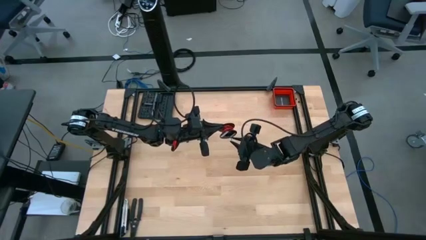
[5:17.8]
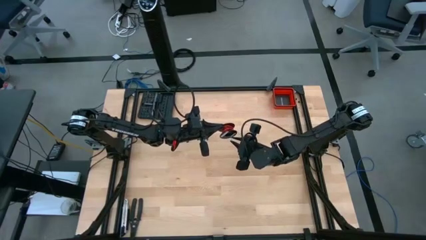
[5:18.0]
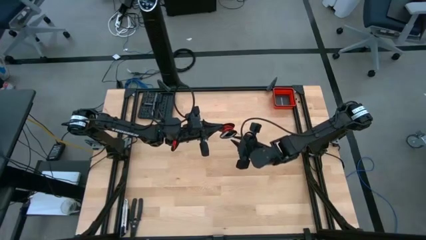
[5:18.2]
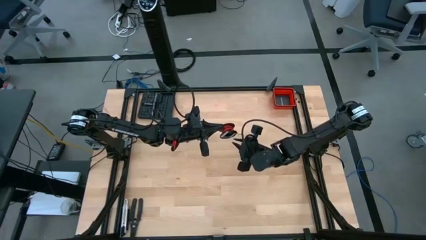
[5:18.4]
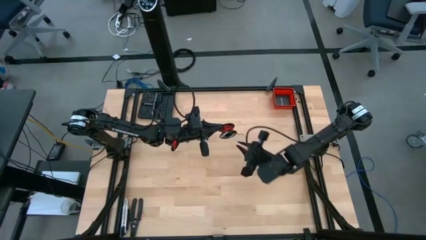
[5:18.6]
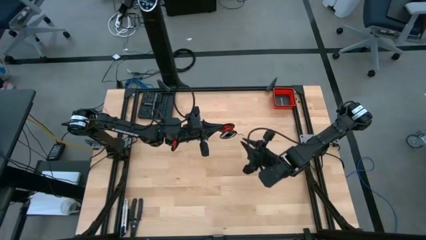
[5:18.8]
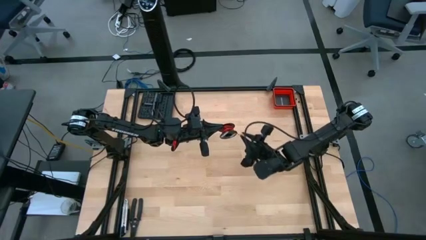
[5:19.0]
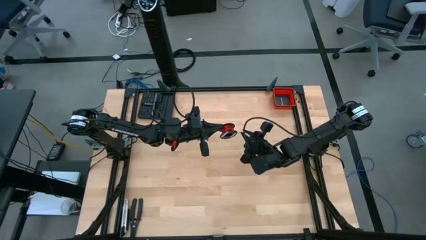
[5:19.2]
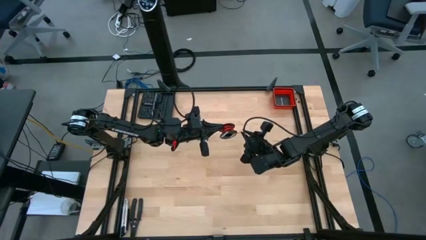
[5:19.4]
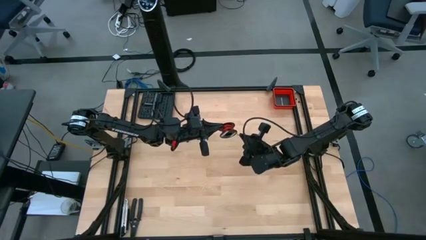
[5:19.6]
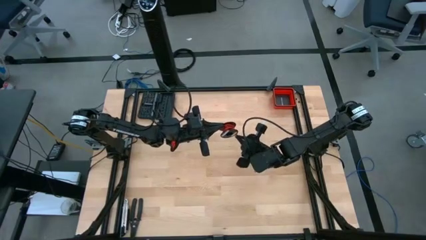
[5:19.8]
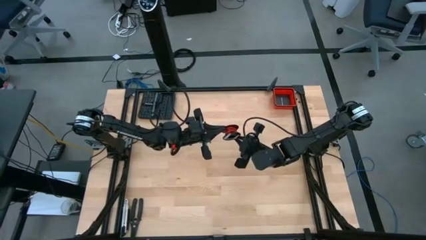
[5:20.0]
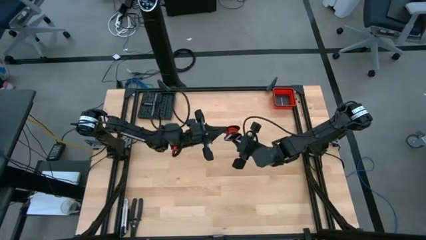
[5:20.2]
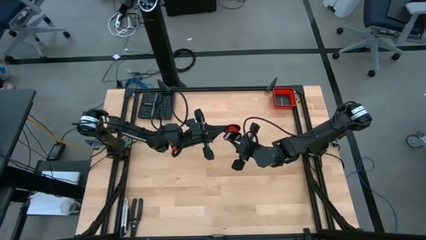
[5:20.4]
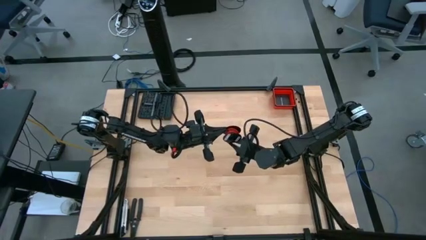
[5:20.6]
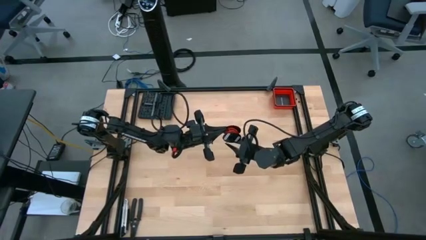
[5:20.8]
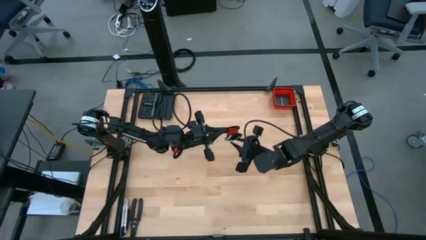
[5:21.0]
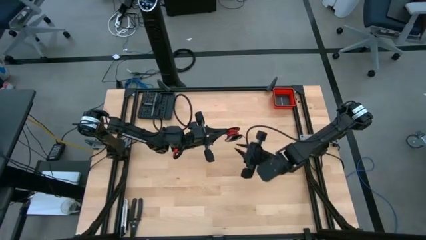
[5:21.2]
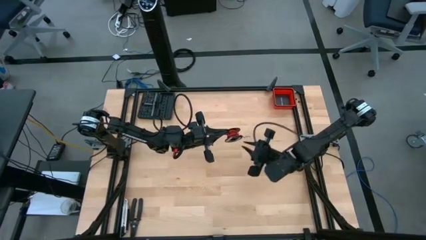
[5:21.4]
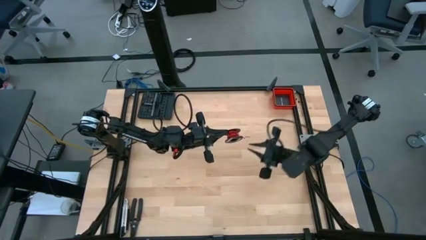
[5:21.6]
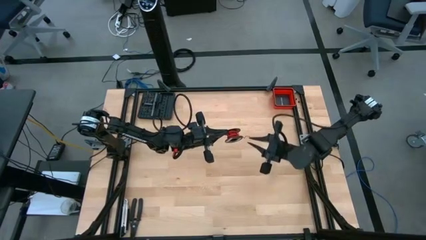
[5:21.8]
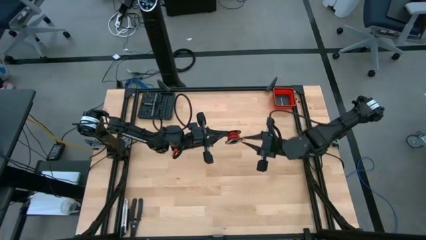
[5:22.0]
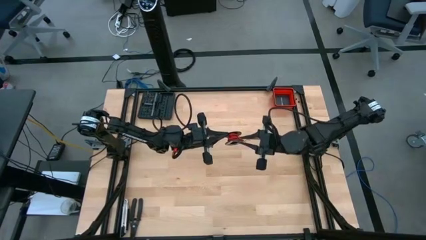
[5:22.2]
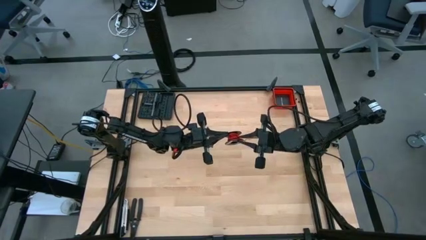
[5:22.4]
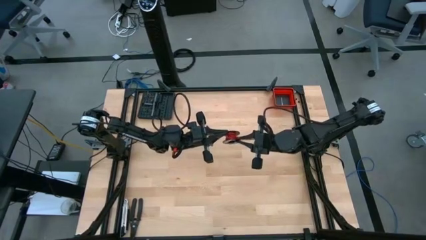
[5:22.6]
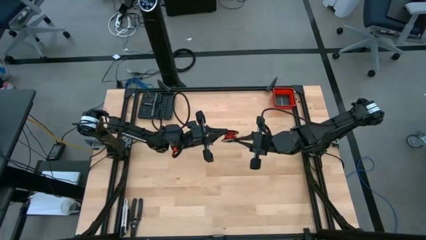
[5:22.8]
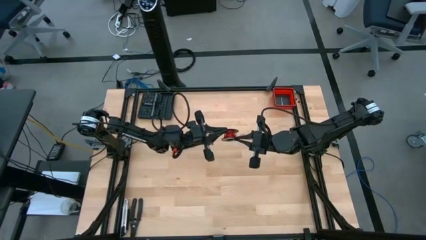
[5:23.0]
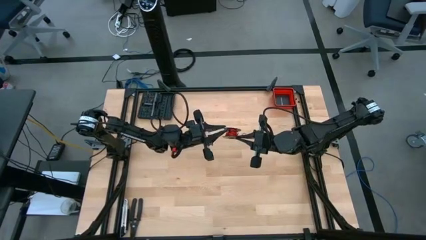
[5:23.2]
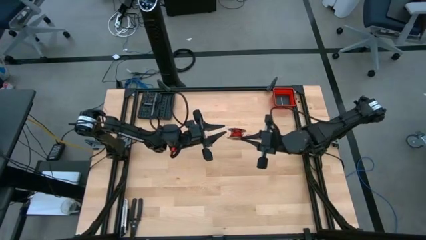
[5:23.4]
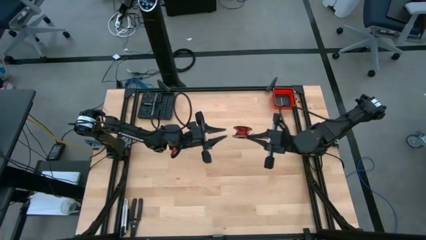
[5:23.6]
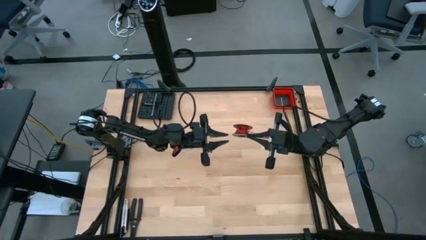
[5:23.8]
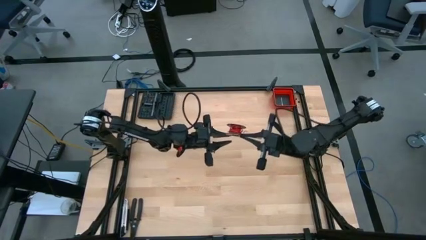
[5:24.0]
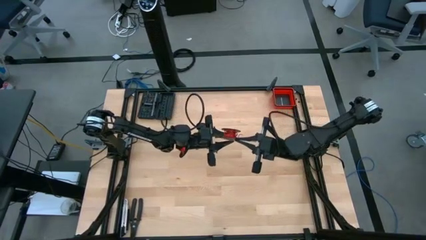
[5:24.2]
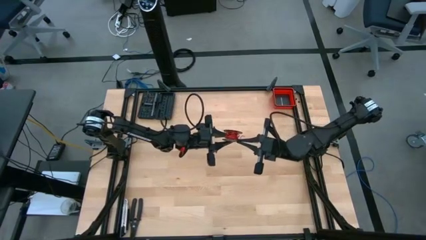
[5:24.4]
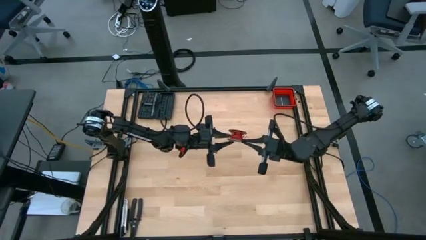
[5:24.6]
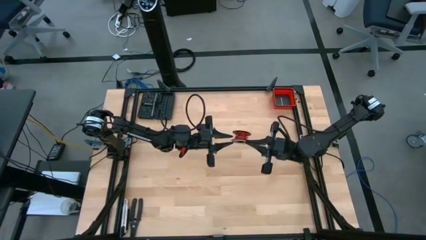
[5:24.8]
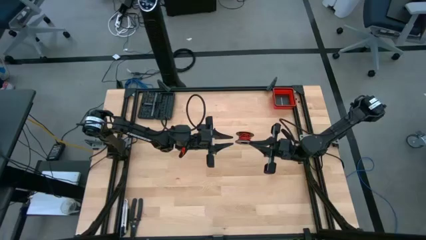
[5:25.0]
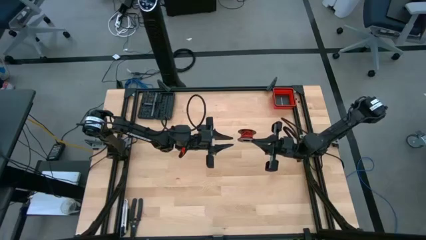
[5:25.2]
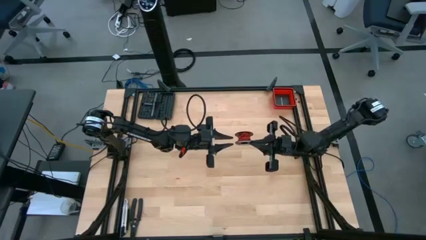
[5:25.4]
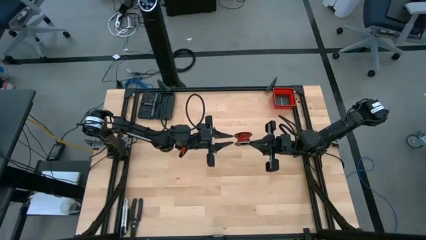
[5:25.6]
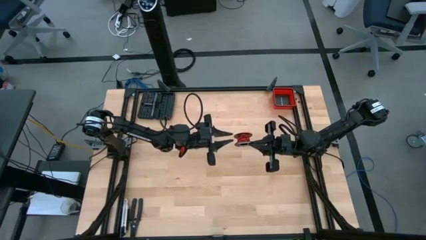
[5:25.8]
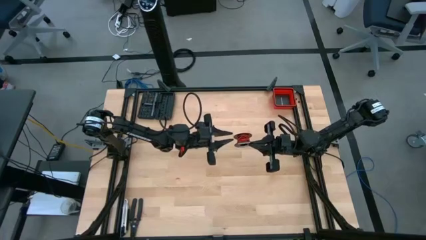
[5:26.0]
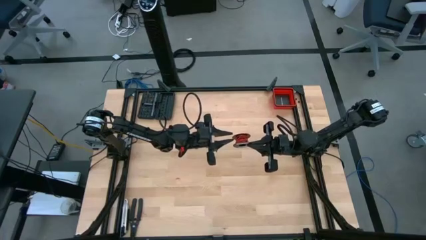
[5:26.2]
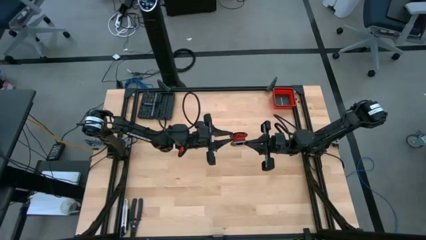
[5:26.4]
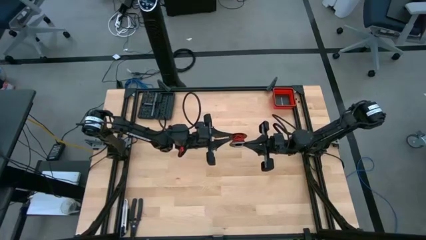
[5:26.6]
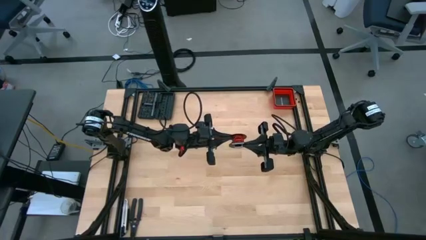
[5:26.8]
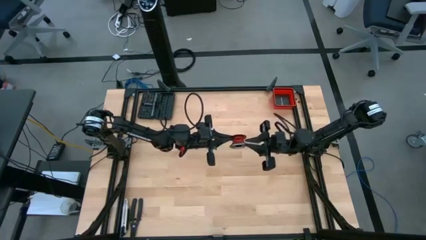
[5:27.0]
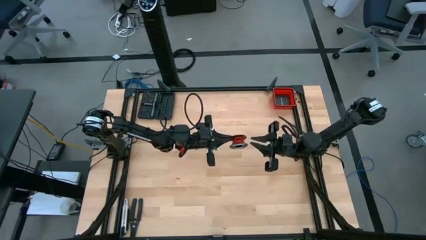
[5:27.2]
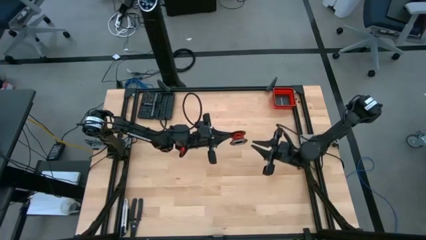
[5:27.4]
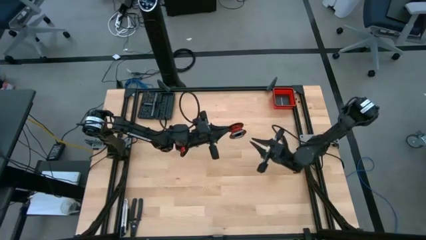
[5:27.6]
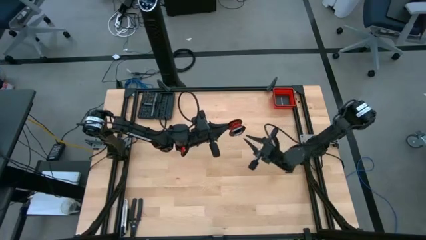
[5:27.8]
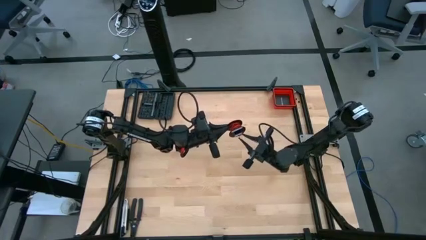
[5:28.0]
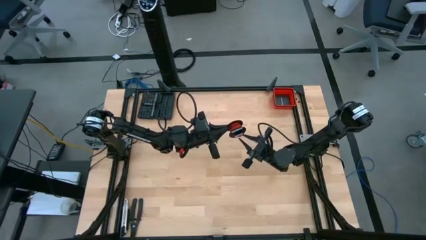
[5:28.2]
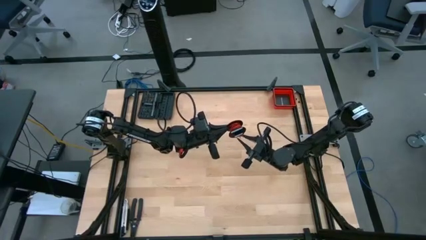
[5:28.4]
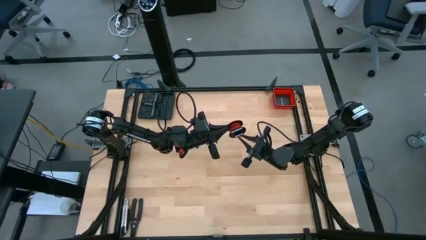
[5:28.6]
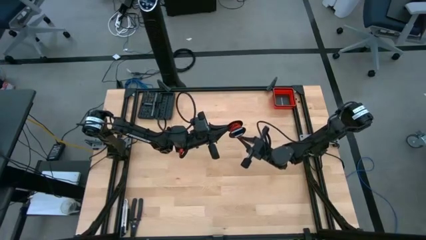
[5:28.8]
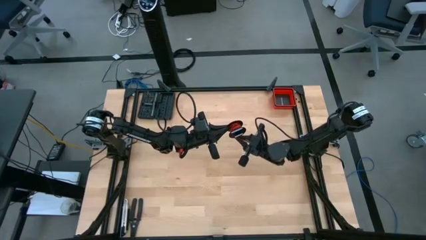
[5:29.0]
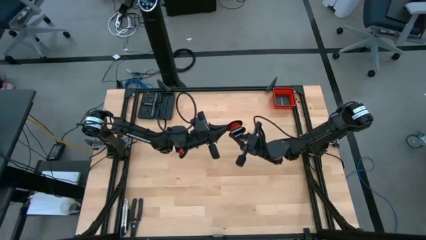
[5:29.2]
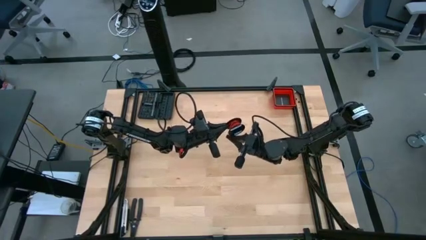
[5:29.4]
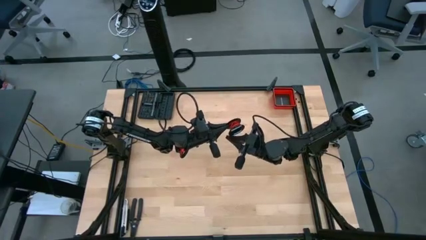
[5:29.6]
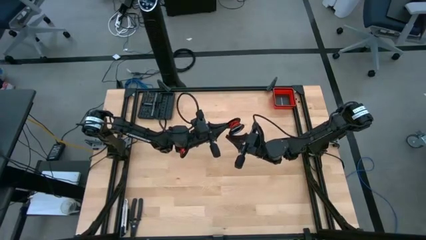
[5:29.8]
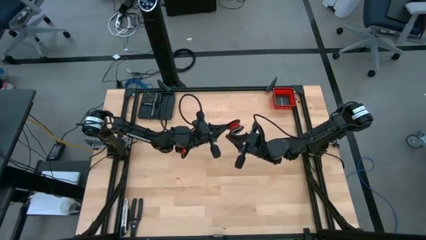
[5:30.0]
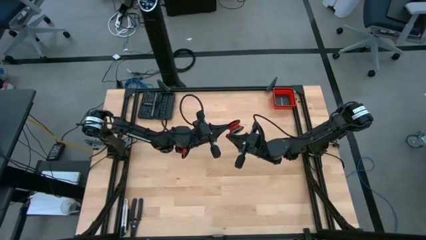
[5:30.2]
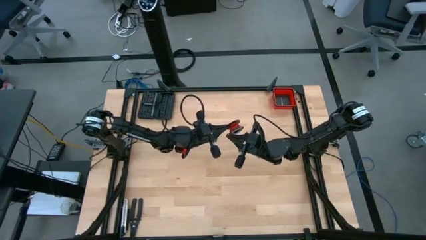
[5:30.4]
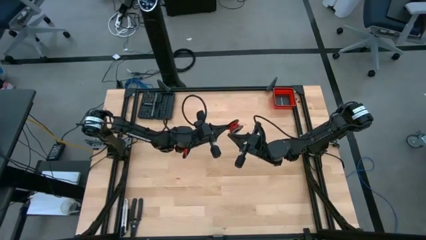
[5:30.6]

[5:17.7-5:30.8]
Task: Coil cords
Coil the red wire on the black spool

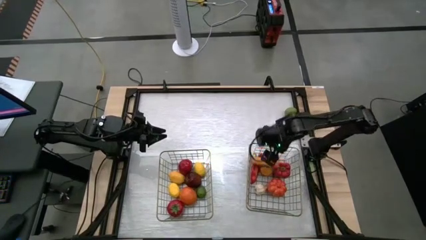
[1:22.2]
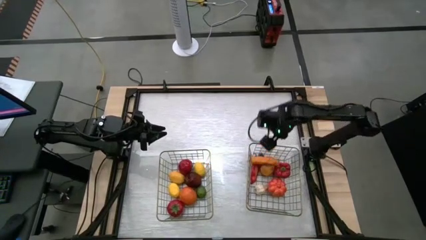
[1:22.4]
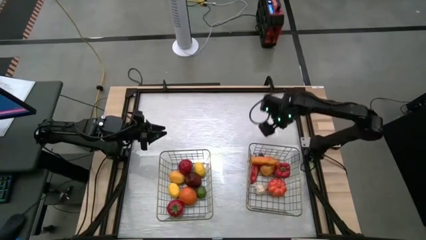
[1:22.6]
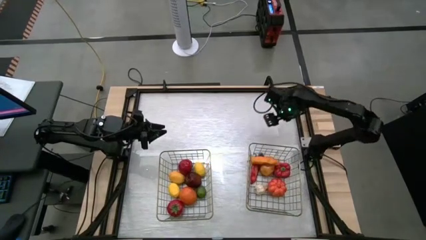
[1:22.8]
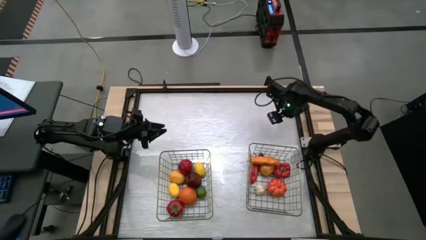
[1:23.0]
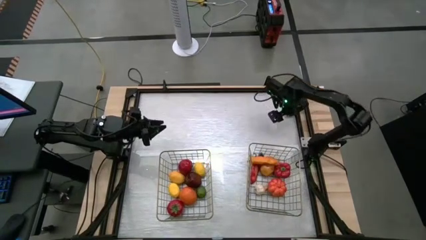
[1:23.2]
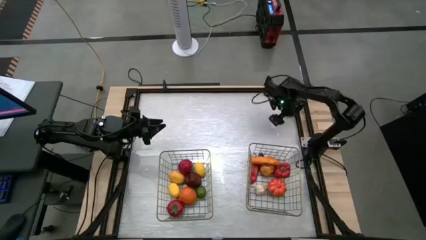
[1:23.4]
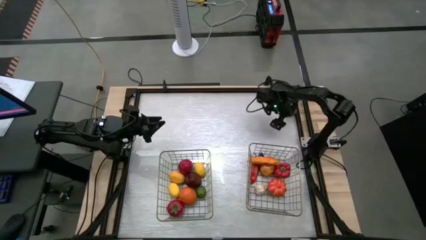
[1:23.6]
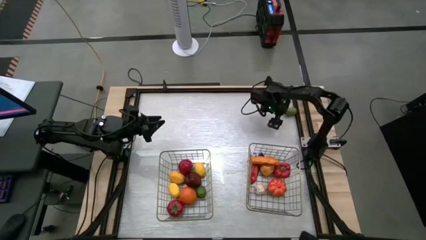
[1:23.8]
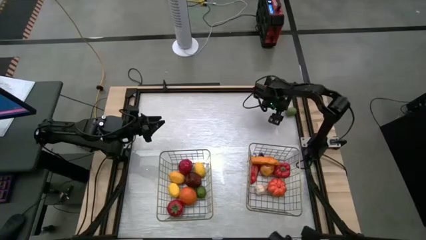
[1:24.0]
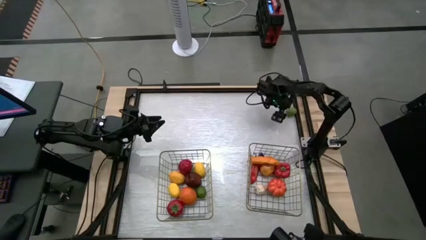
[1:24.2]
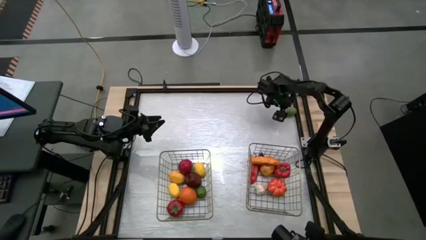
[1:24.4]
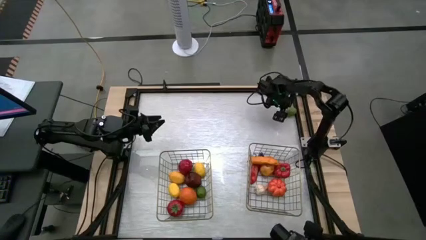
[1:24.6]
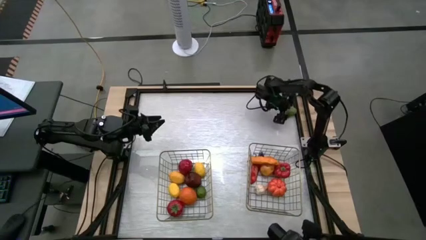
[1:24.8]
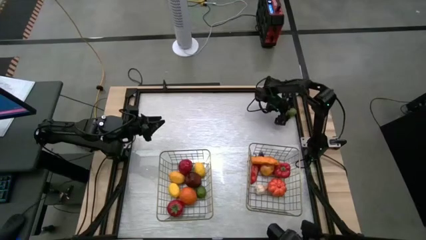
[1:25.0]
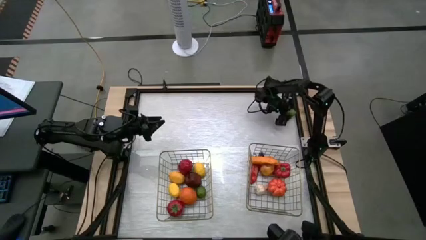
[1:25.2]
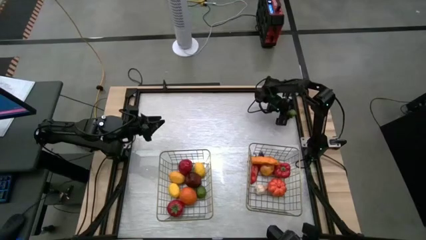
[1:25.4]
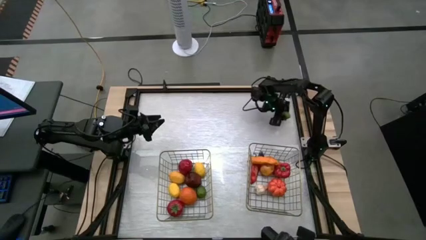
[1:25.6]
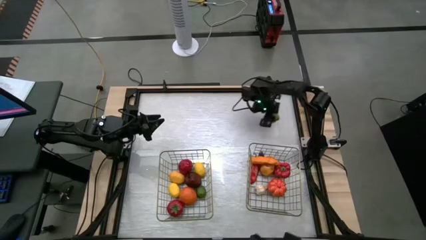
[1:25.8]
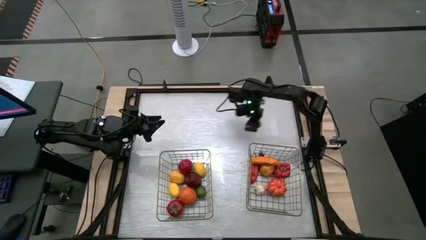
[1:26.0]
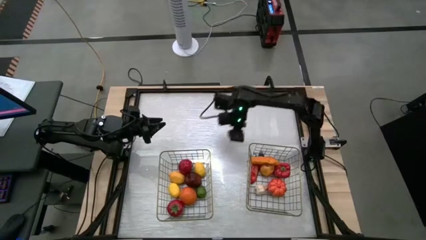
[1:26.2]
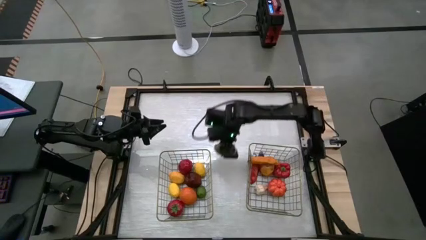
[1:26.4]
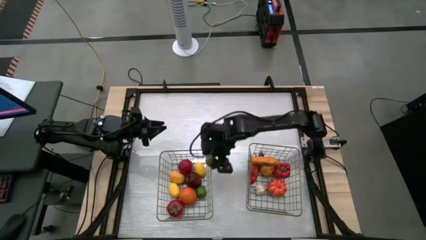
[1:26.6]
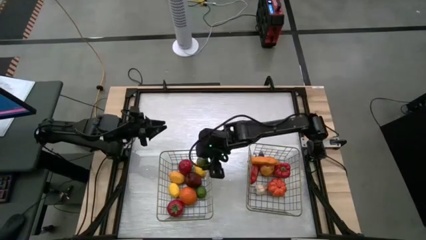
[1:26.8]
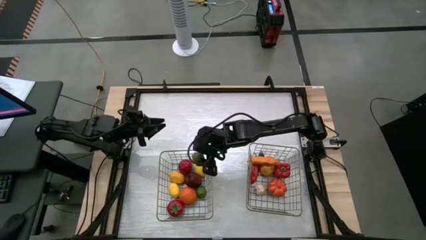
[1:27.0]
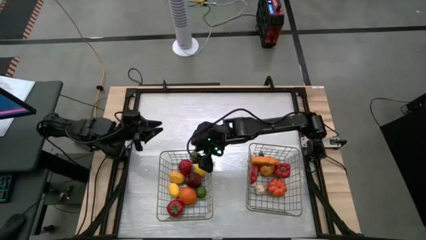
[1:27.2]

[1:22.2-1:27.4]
Task: Sort produce into baskets
Put the lime into the left wire basket
